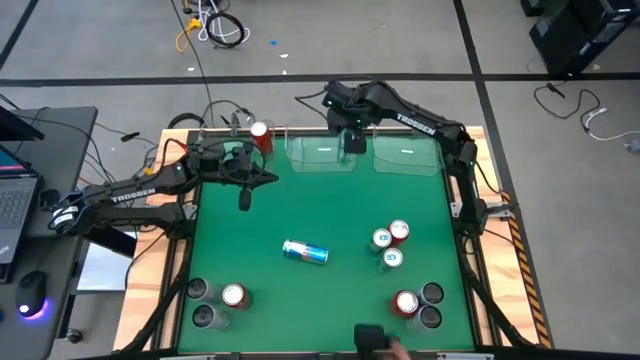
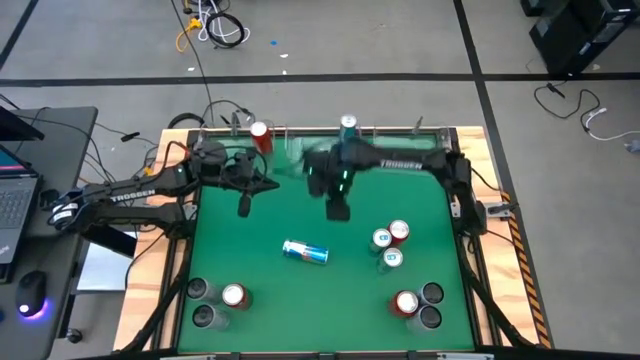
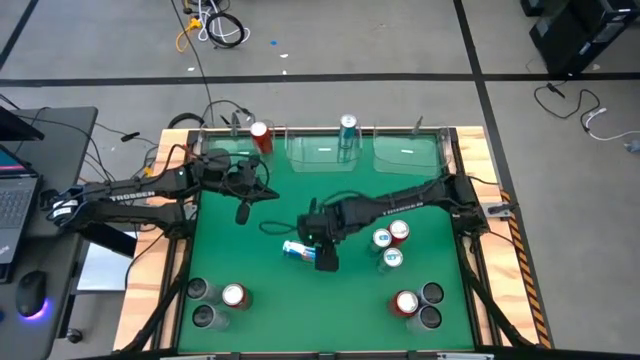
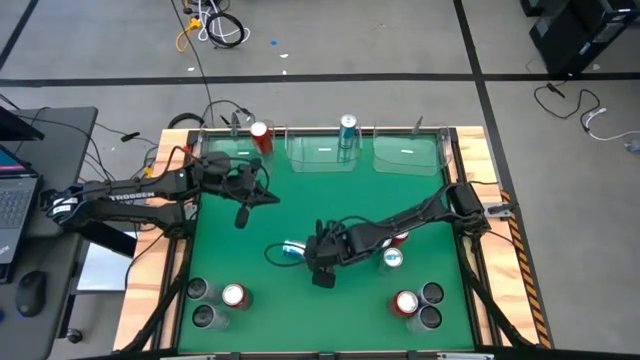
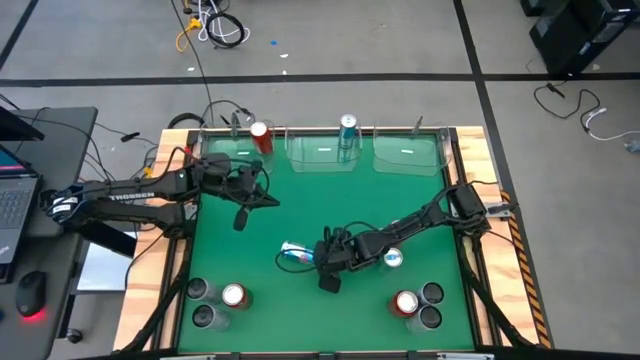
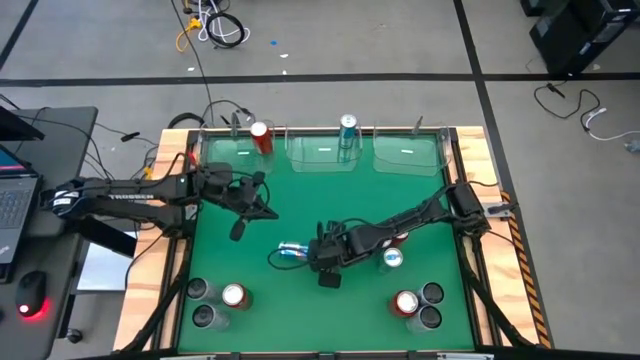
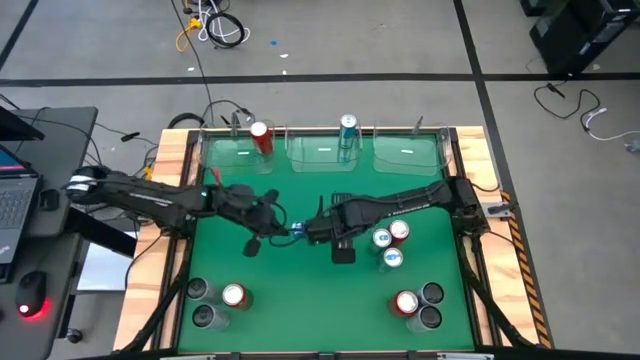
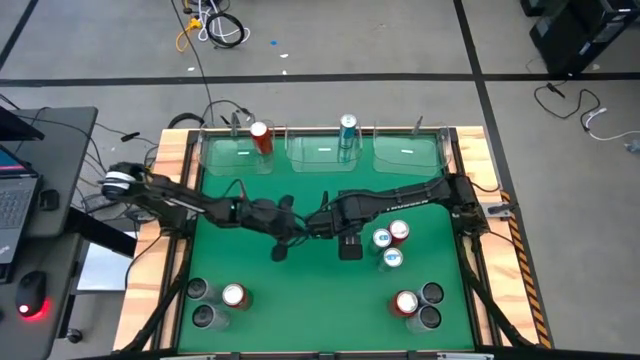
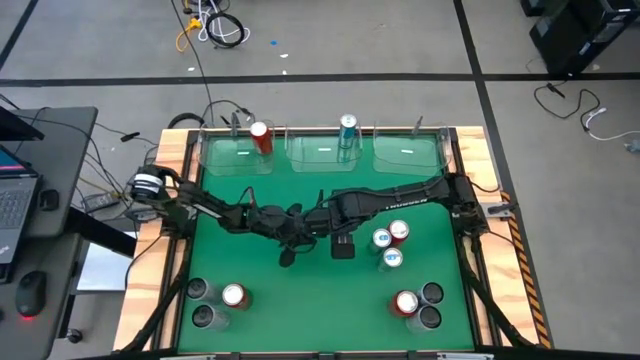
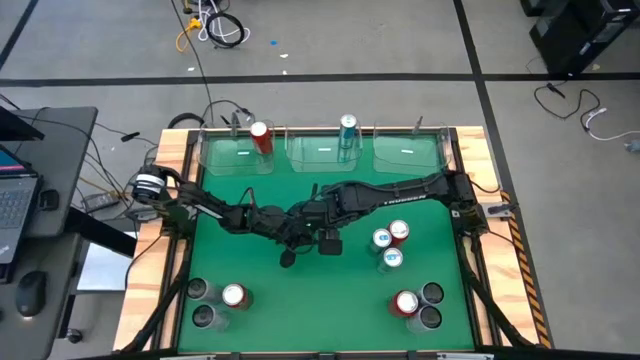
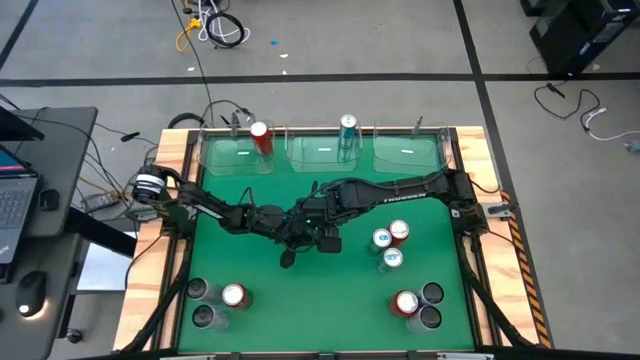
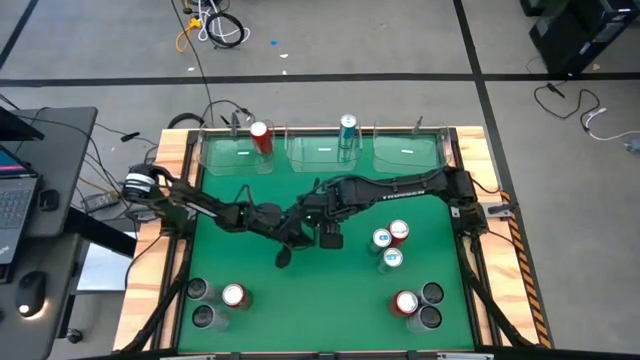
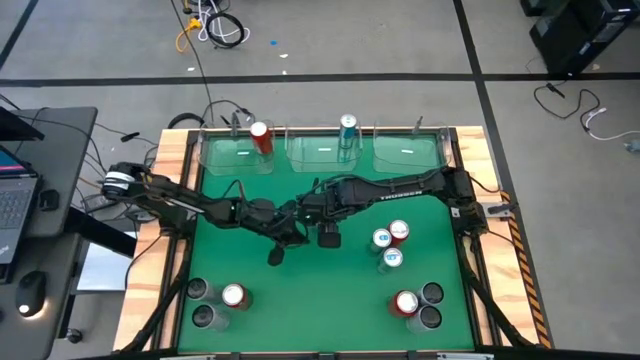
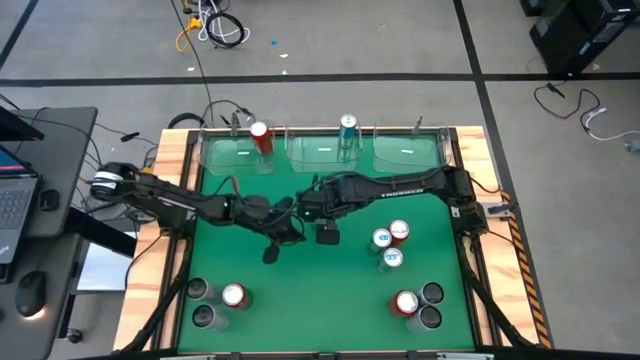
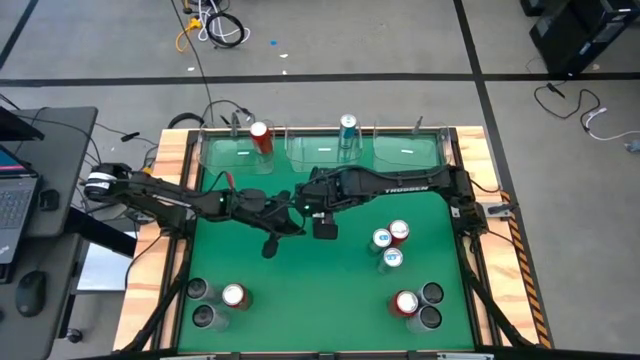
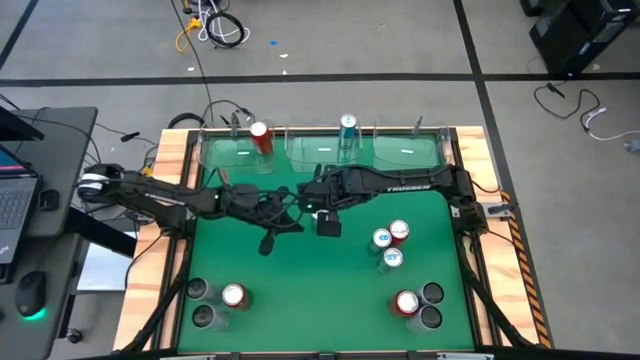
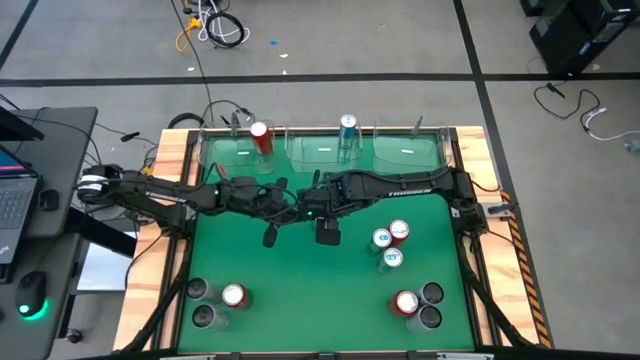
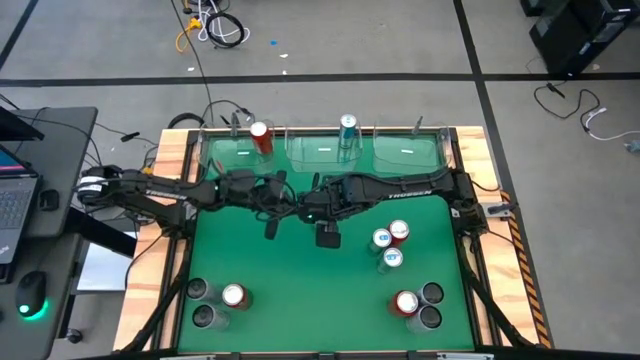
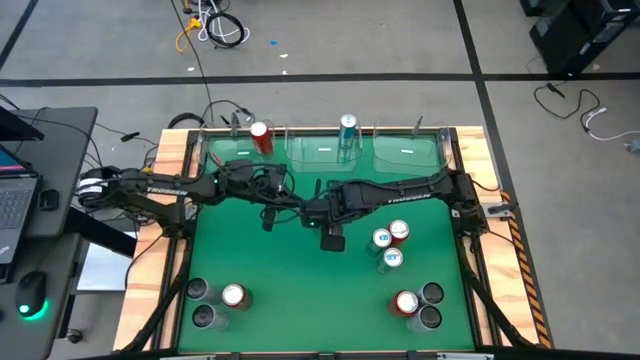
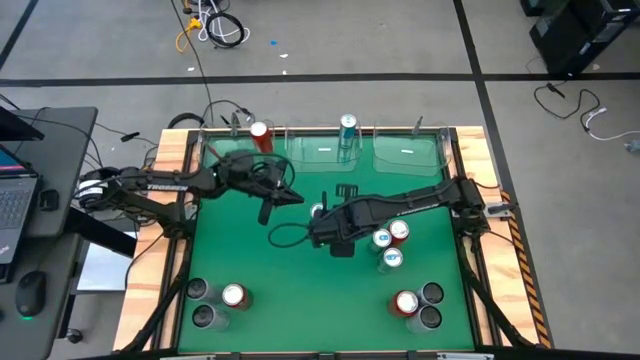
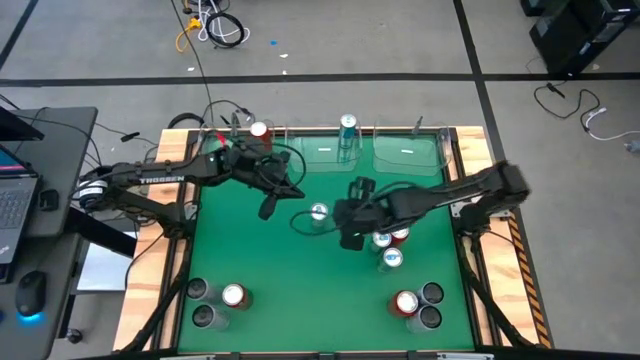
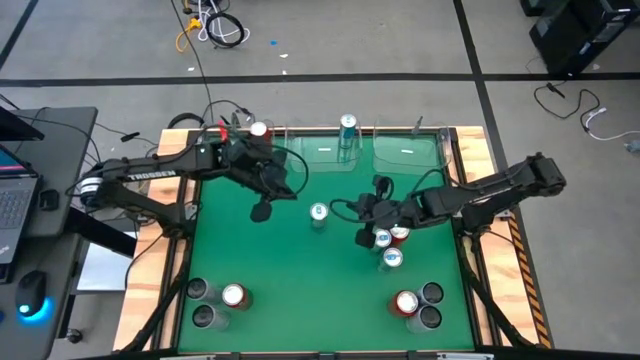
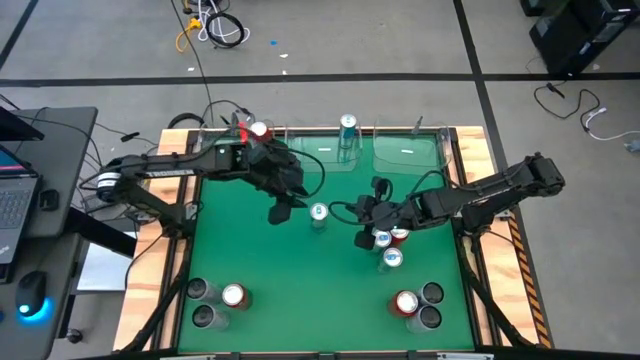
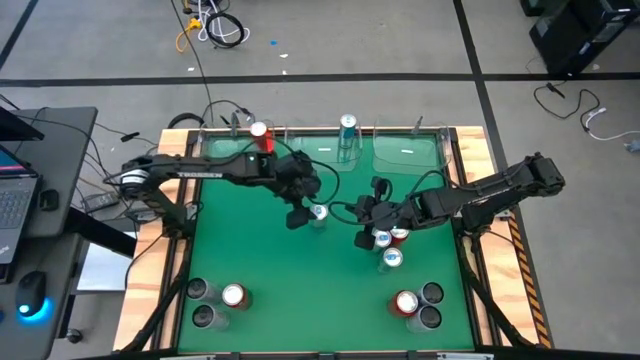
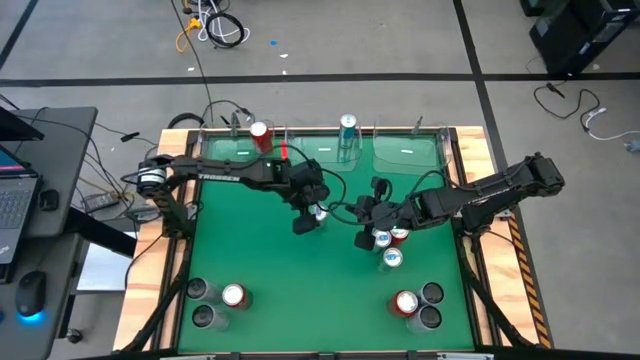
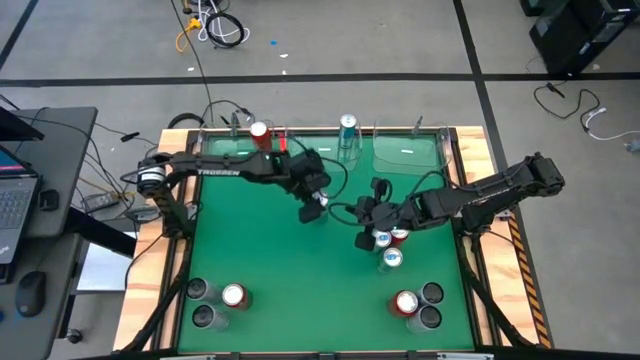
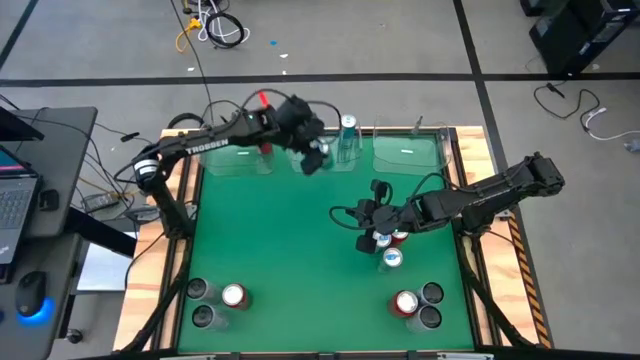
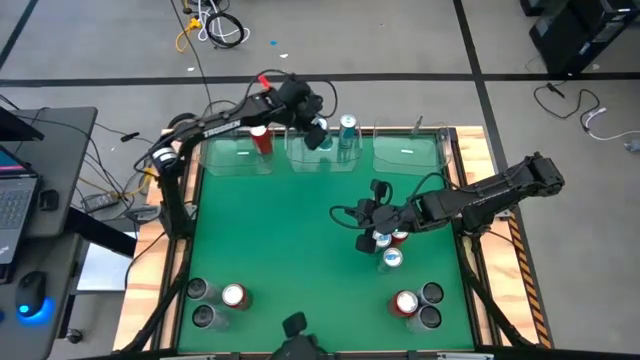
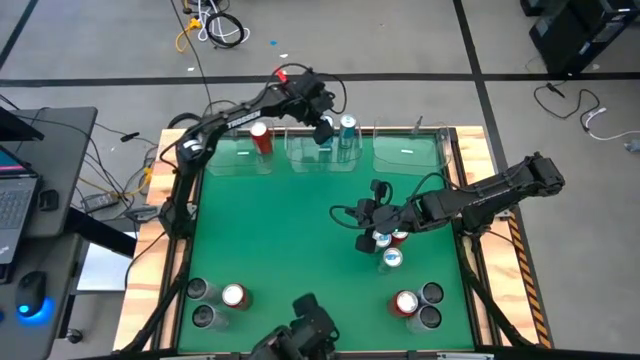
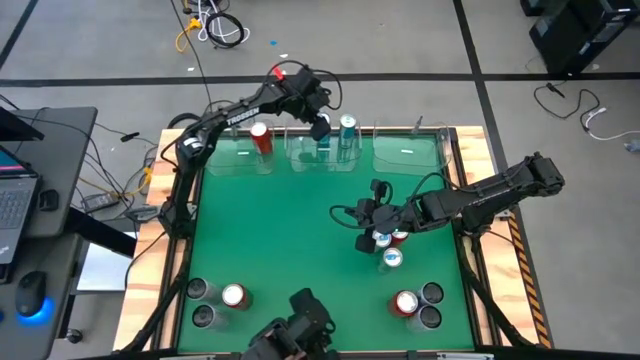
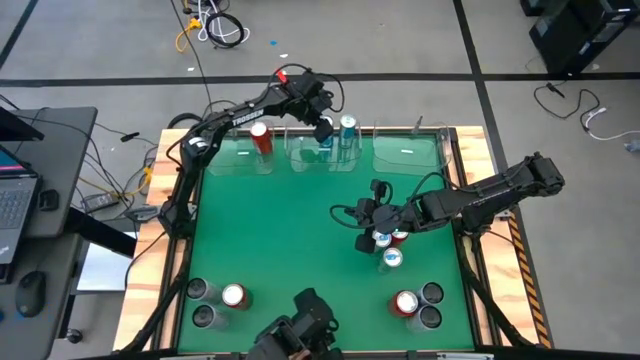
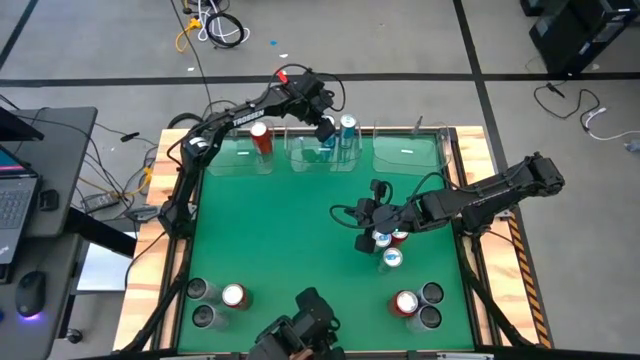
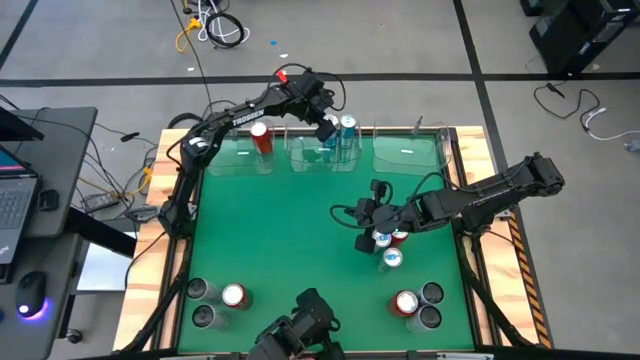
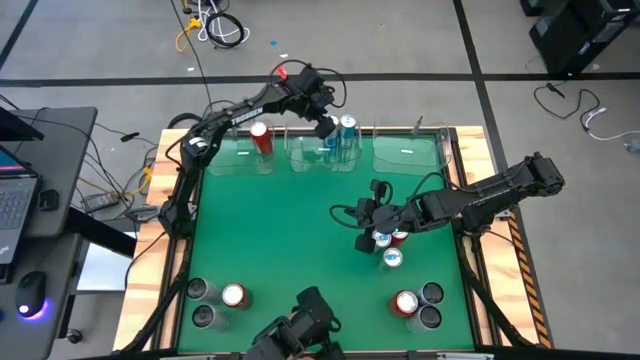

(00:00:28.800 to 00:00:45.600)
Task: Sort soda cans
Put the blue soda can into the transparent middle bin
